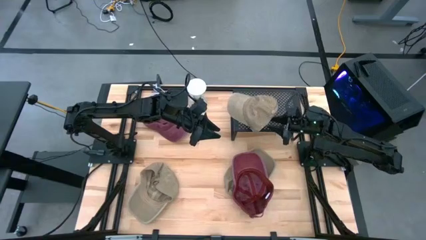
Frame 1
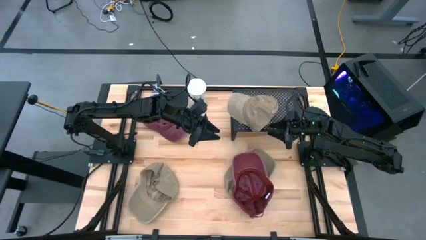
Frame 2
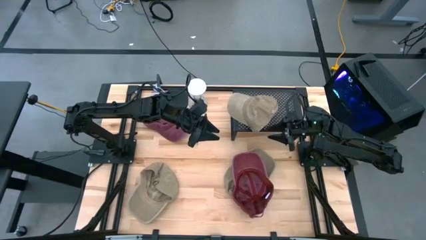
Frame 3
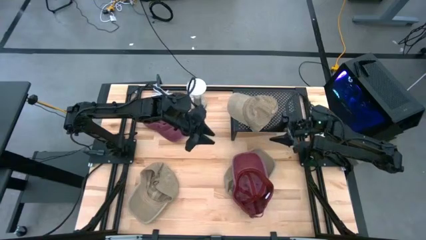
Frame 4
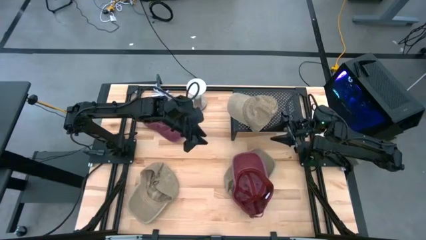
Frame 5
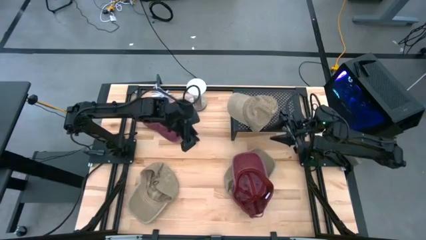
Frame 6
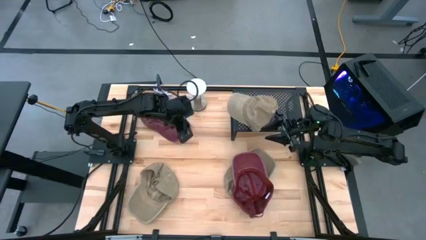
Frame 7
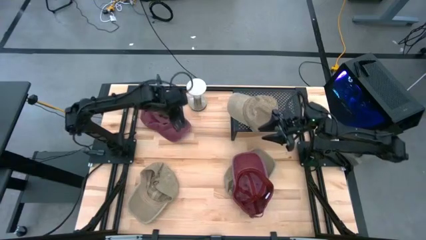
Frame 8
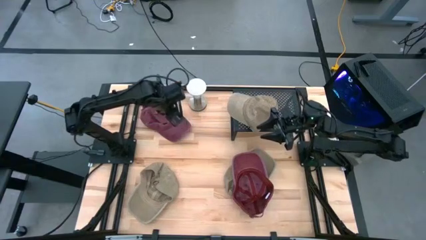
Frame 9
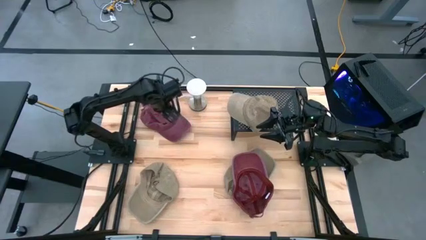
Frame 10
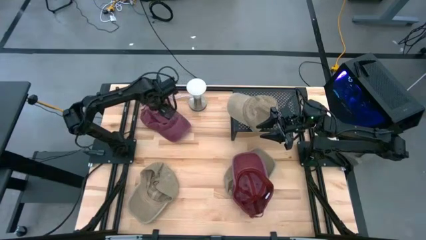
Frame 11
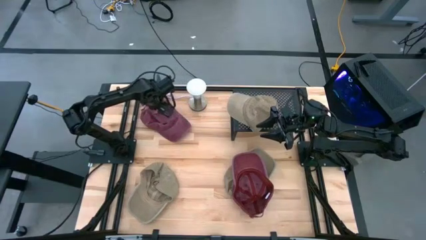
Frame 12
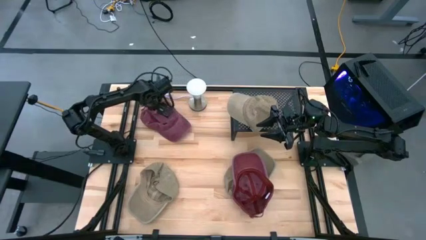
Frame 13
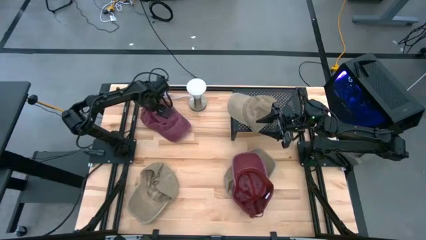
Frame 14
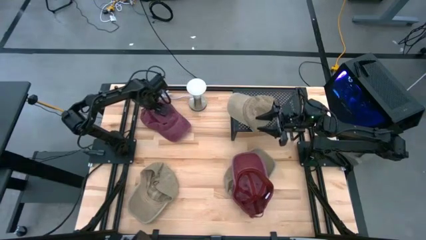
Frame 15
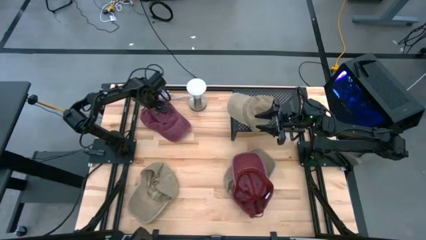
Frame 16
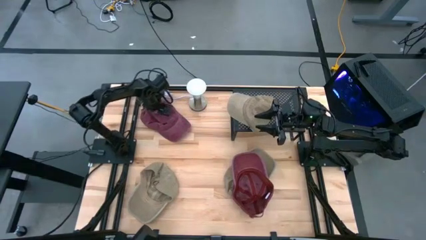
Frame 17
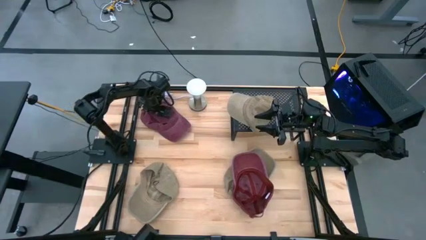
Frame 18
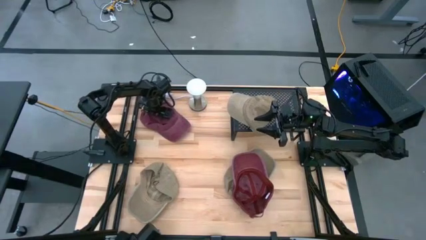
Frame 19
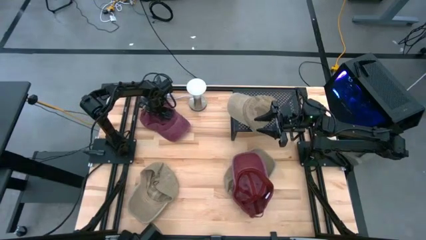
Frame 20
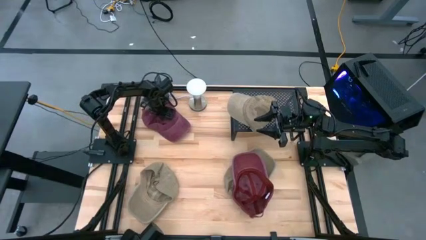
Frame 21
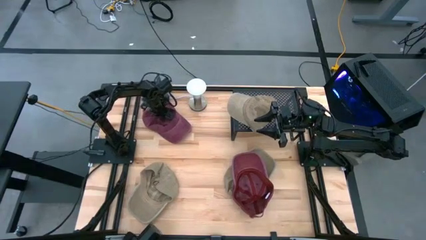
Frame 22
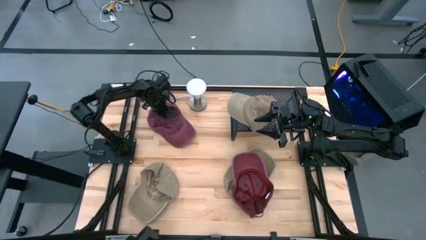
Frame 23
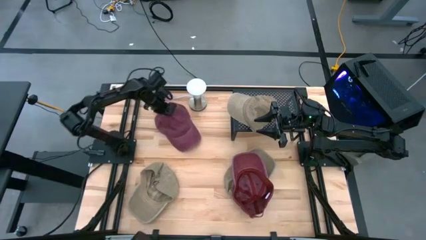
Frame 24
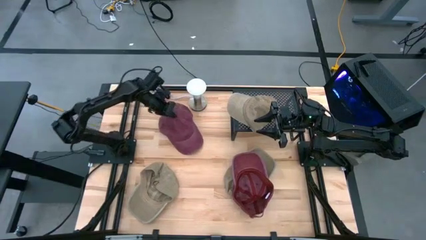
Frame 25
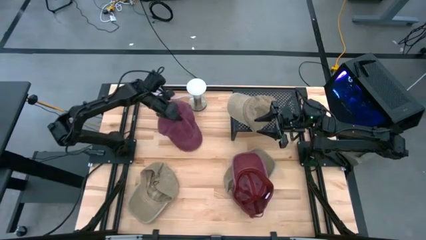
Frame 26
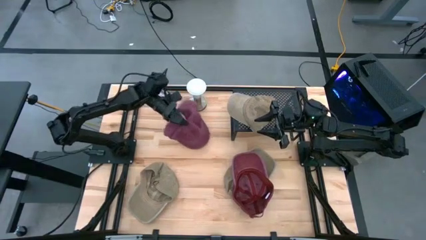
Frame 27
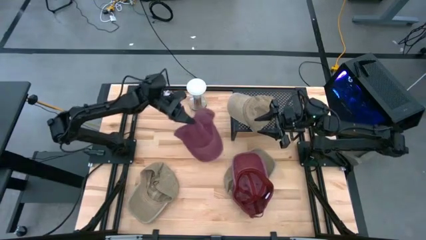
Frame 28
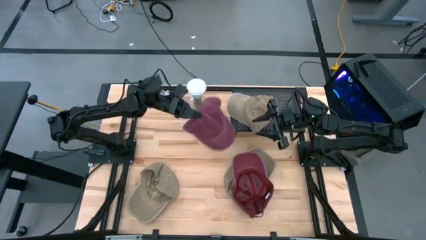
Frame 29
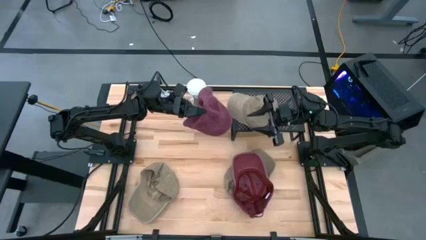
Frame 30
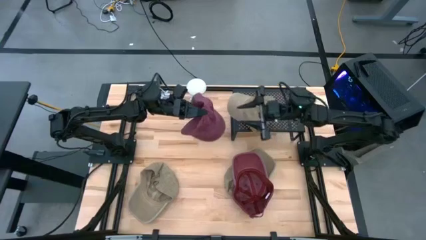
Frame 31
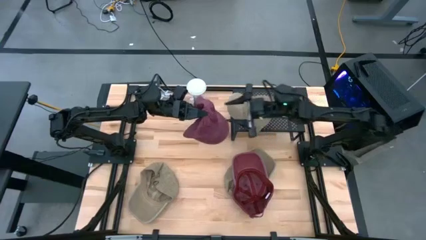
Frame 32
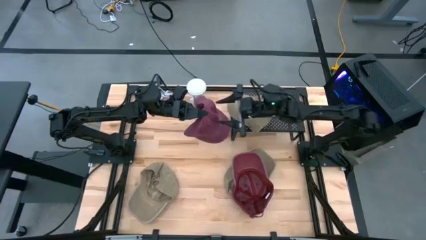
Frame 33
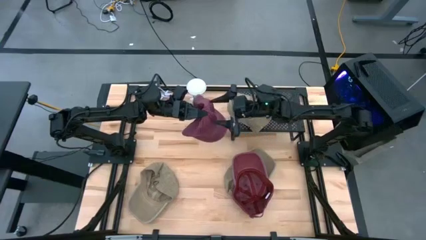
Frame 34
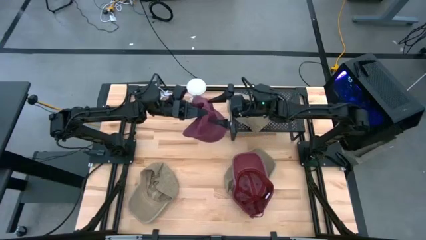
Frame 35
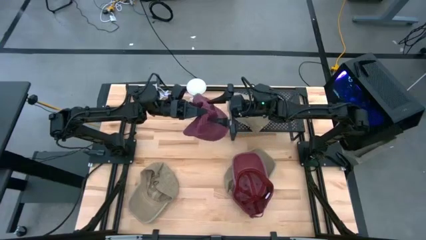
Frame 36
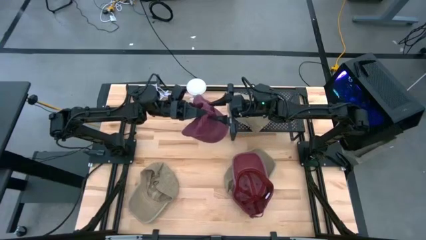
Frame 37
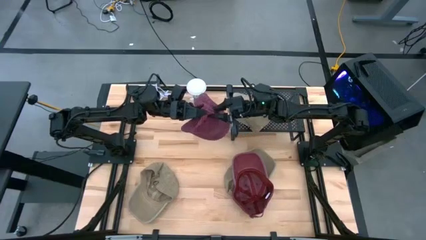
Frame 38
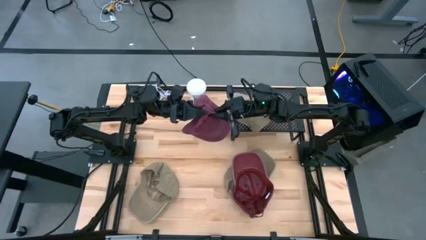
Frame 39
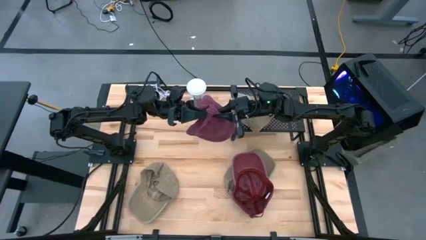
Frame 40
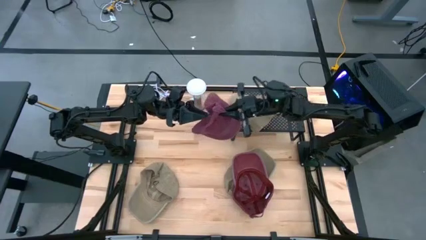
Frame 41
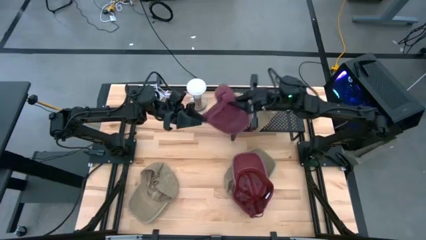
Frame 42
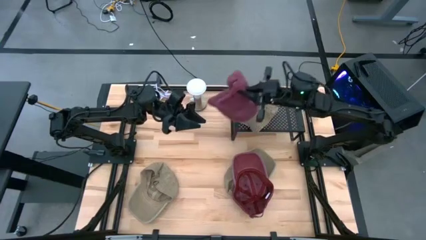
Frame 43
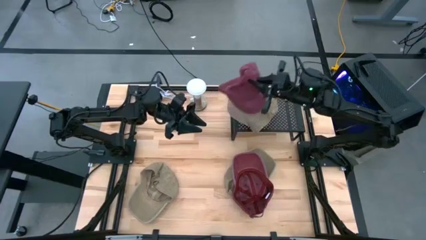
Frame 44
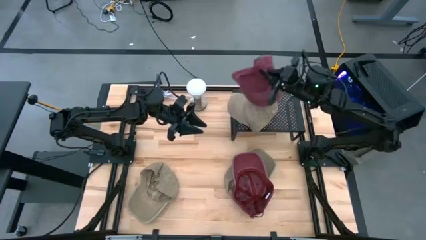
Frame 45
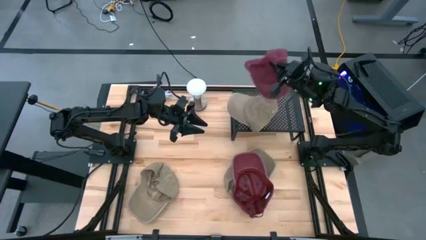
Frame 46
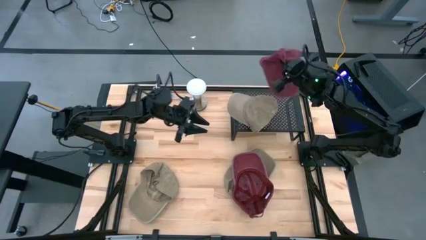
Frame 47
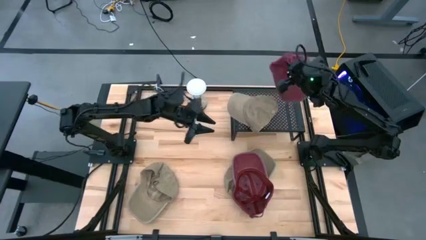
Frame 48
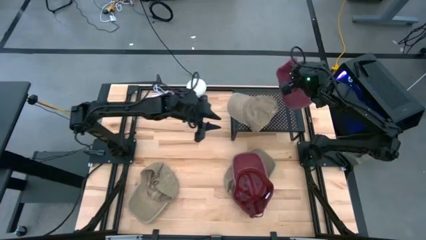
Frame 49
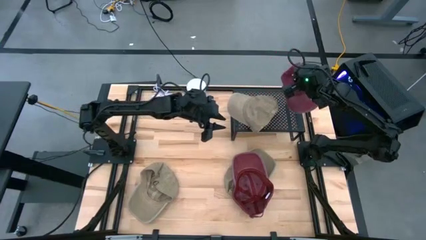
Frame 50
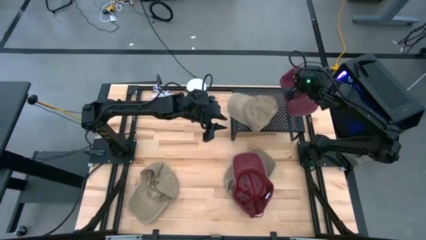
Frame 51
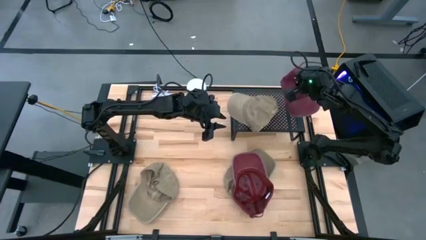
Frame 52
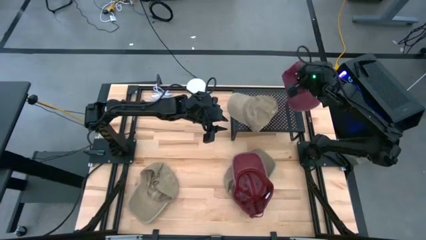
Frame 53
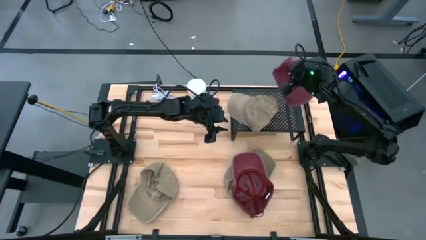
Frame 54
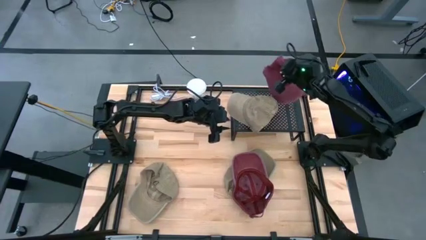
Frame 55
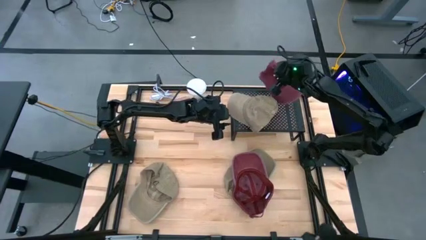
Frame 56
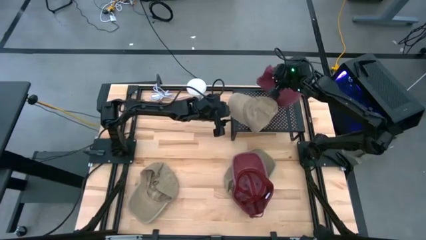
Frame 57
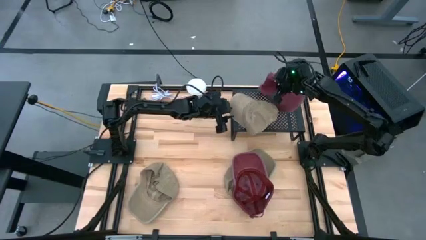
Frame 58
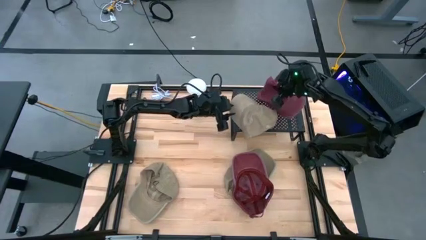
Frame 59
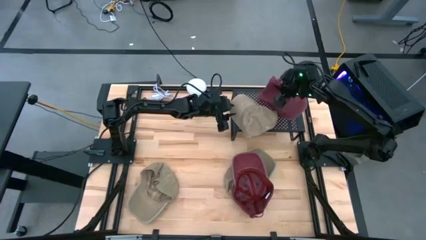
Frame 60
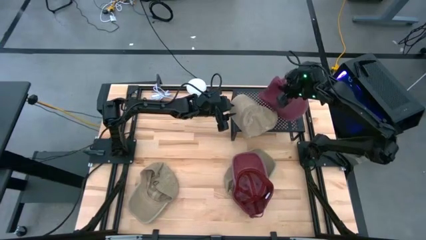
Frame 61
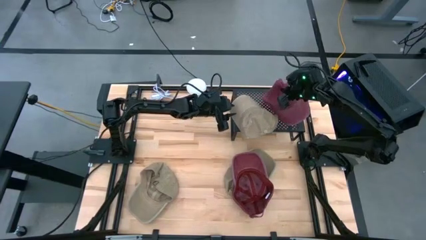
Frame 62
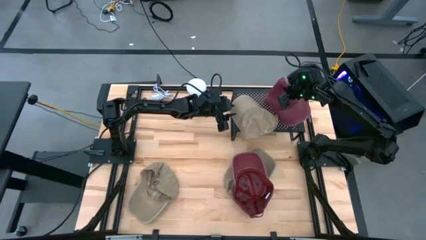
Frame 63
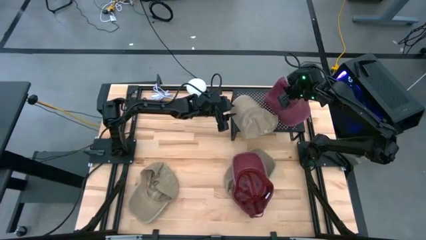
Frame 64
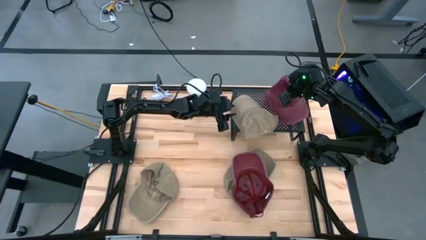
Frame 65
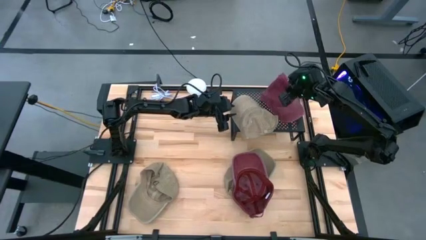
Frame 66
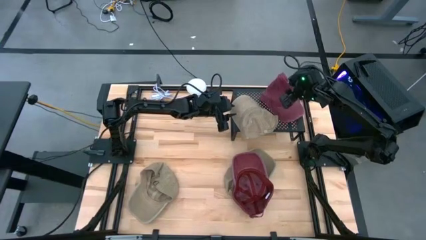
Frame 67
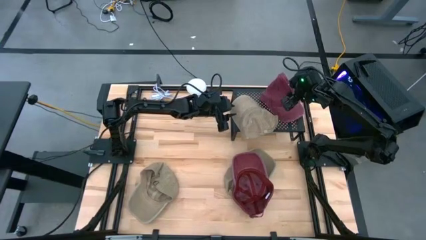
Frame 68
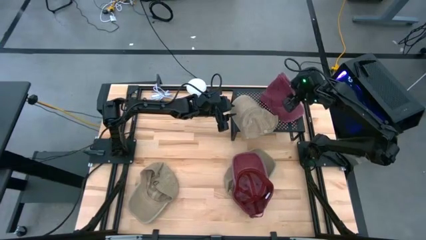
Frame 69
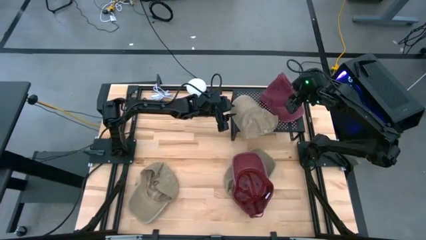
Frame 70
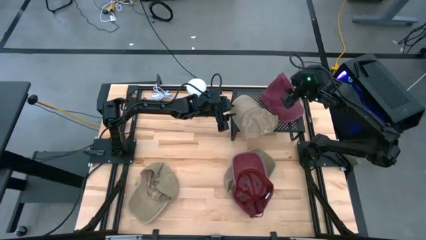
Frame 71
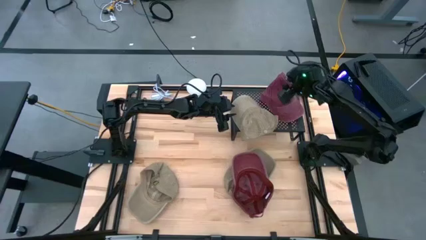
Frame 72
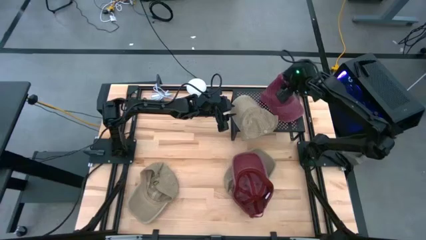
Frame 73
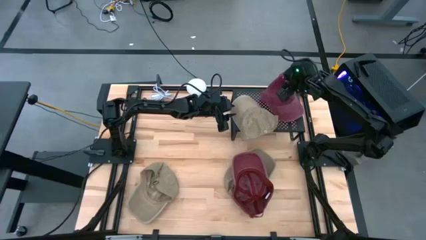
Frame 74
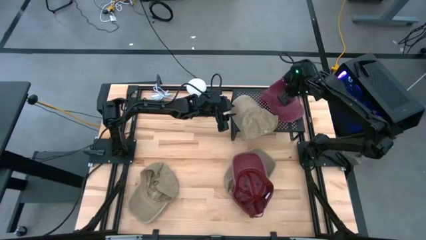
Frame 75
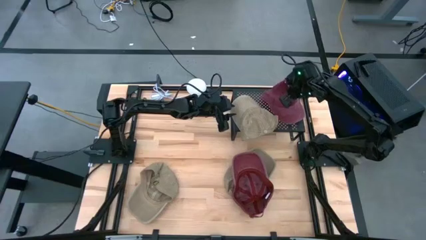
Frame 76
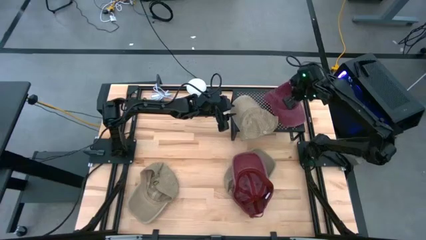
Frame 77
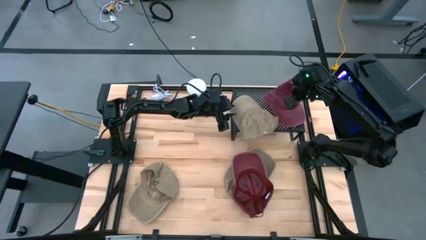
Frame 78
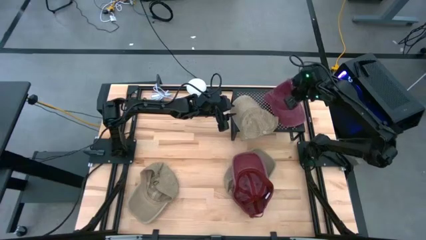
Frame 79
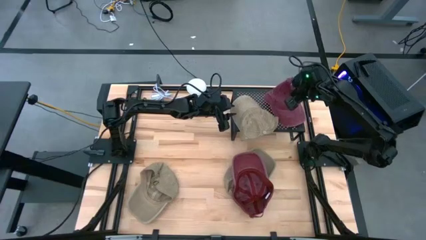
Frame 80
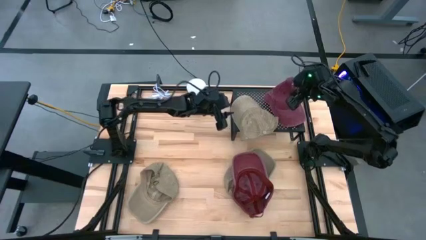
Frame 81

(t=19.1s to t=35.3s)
Task: Pick & Place hat
Put the top red hat on the black shelf
